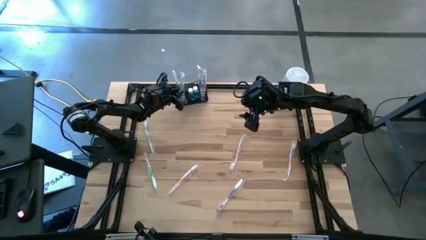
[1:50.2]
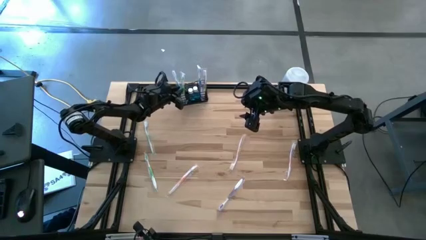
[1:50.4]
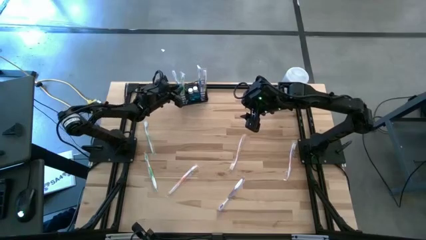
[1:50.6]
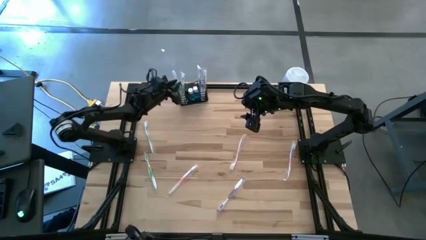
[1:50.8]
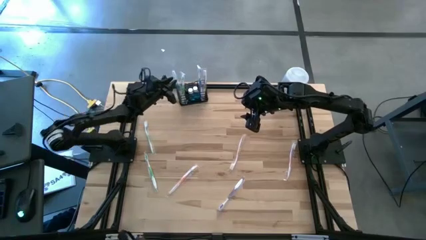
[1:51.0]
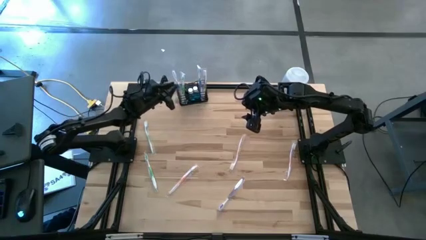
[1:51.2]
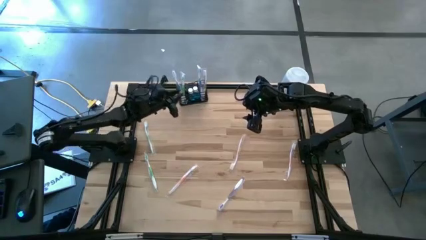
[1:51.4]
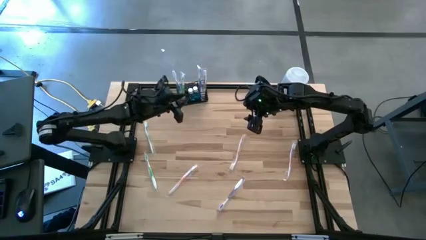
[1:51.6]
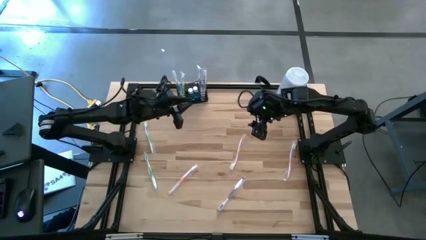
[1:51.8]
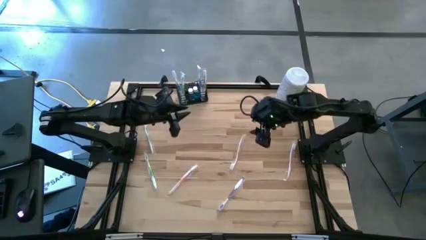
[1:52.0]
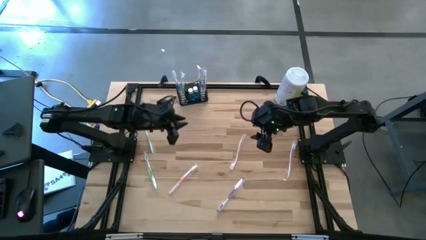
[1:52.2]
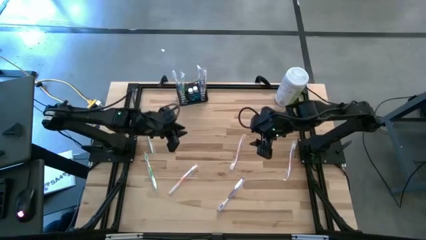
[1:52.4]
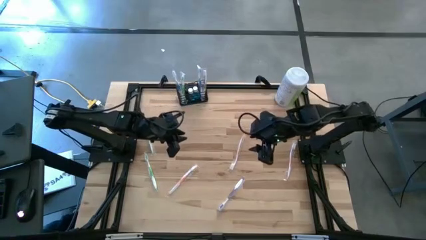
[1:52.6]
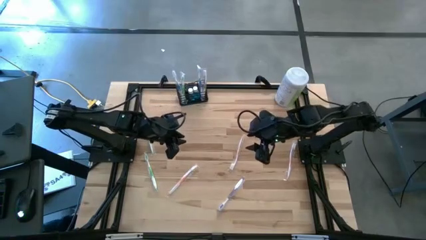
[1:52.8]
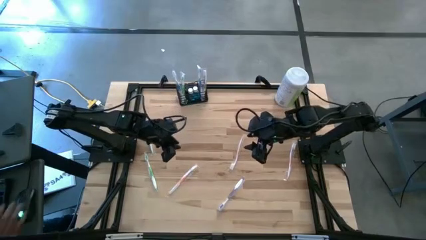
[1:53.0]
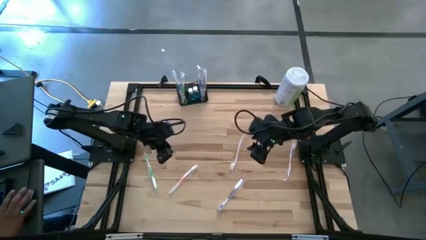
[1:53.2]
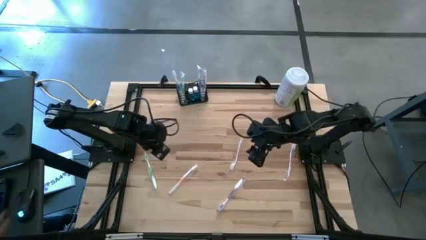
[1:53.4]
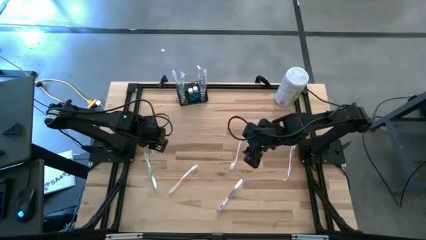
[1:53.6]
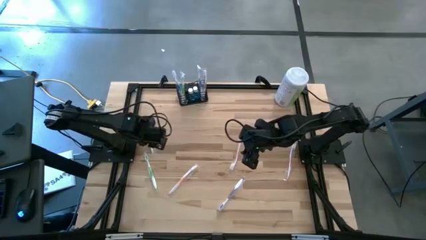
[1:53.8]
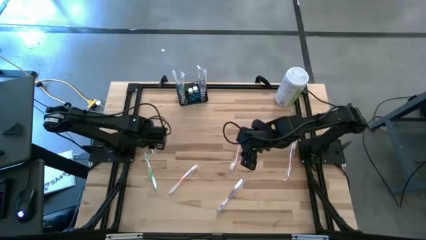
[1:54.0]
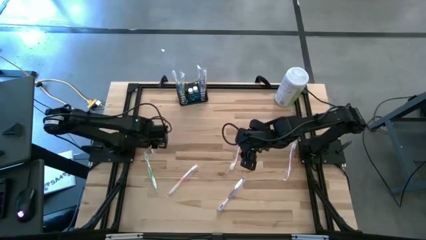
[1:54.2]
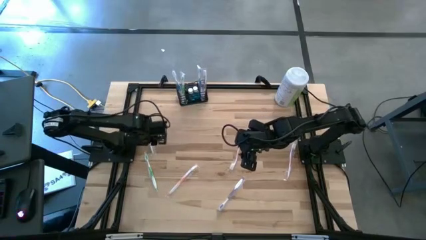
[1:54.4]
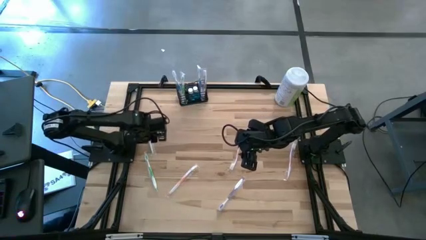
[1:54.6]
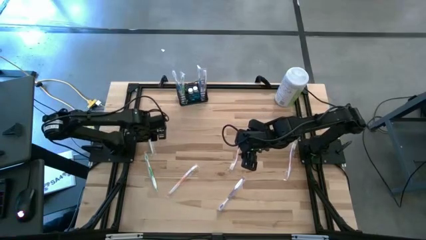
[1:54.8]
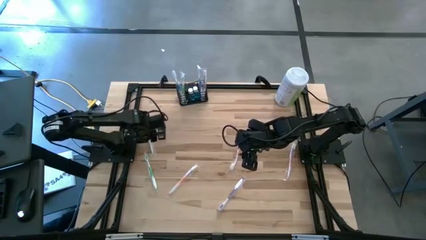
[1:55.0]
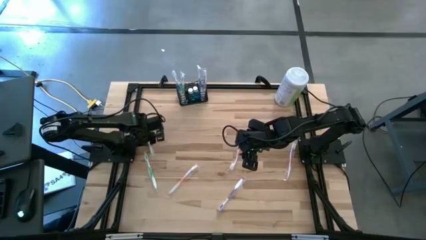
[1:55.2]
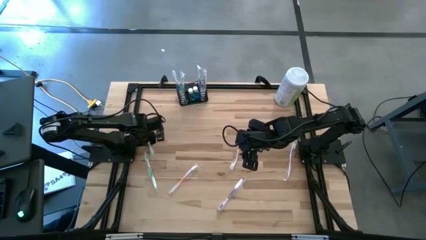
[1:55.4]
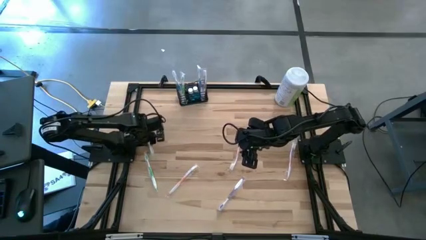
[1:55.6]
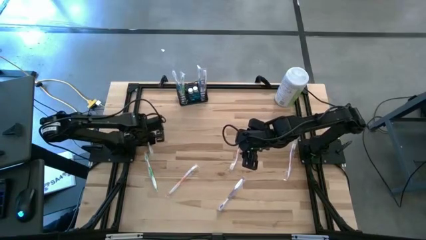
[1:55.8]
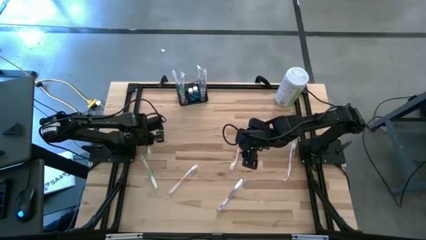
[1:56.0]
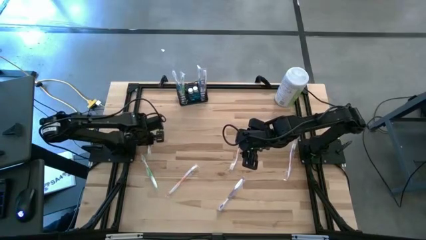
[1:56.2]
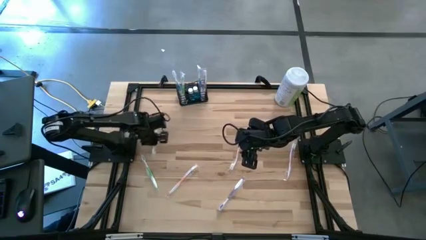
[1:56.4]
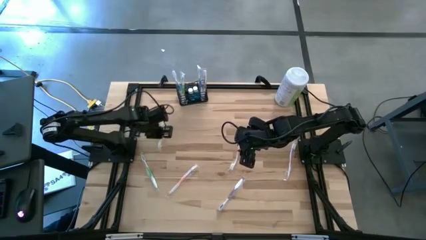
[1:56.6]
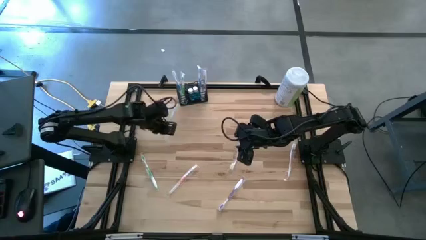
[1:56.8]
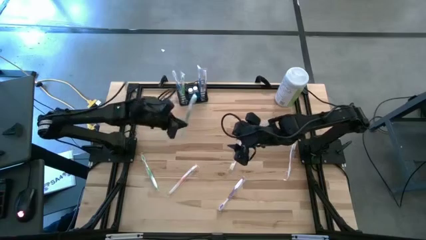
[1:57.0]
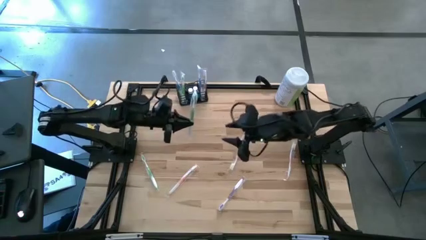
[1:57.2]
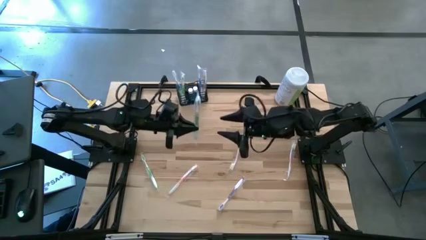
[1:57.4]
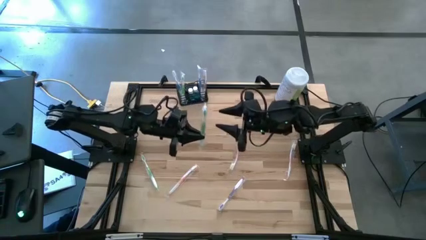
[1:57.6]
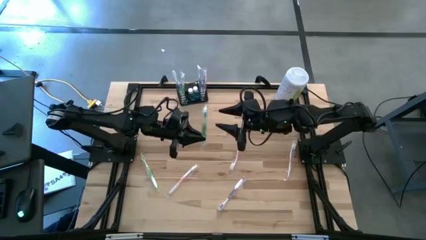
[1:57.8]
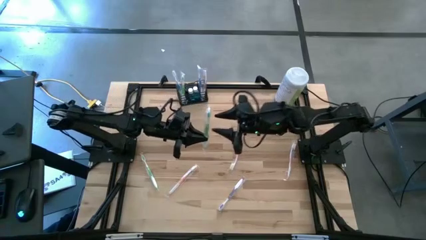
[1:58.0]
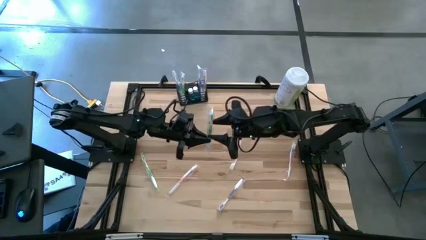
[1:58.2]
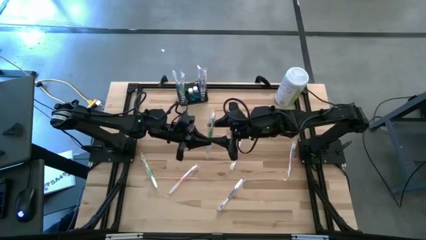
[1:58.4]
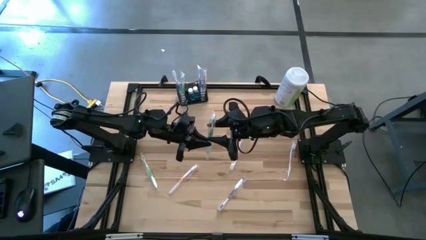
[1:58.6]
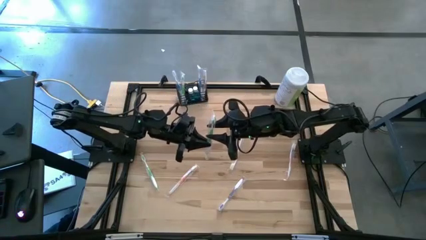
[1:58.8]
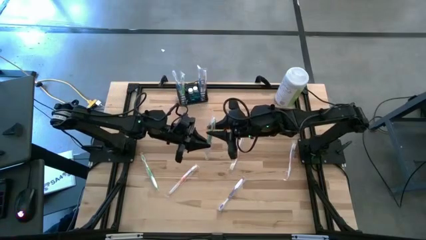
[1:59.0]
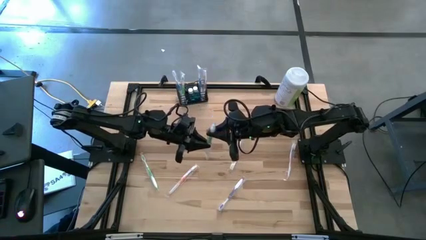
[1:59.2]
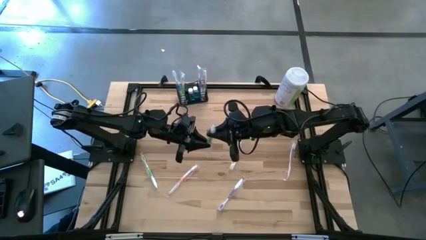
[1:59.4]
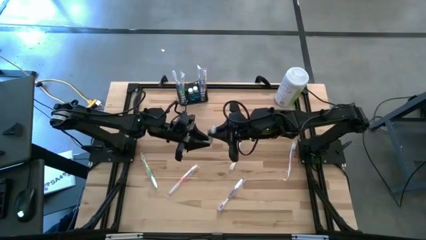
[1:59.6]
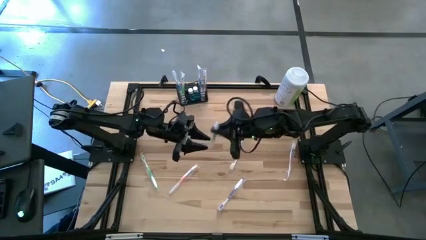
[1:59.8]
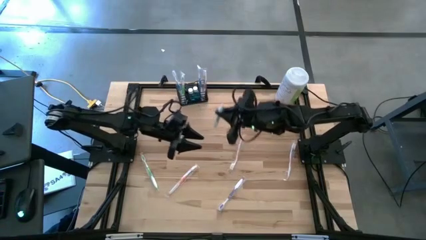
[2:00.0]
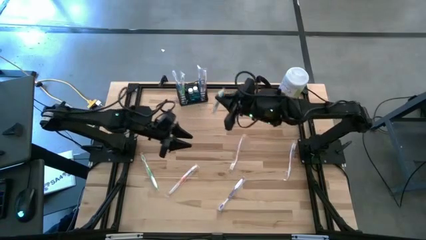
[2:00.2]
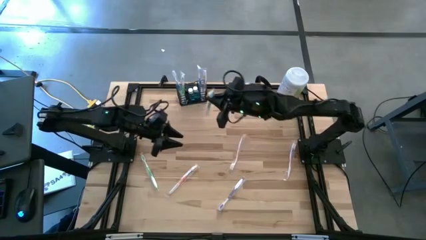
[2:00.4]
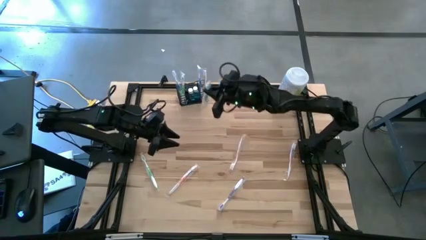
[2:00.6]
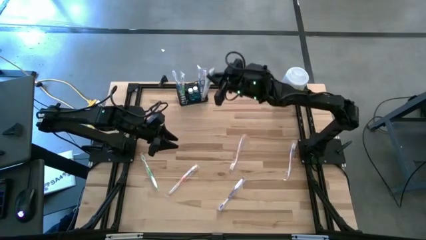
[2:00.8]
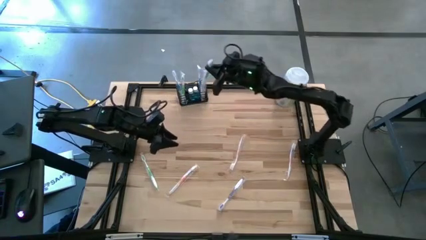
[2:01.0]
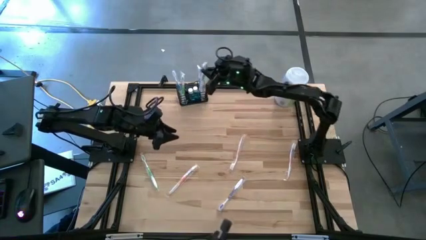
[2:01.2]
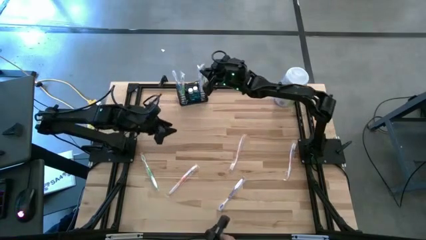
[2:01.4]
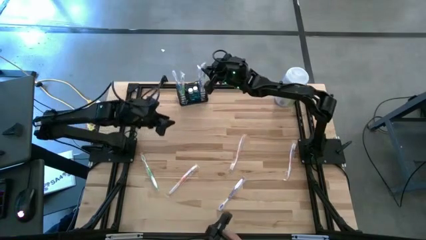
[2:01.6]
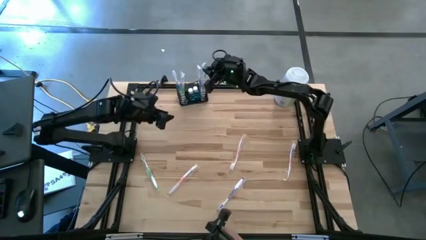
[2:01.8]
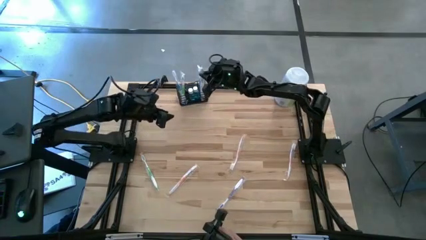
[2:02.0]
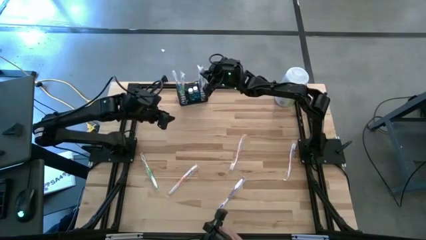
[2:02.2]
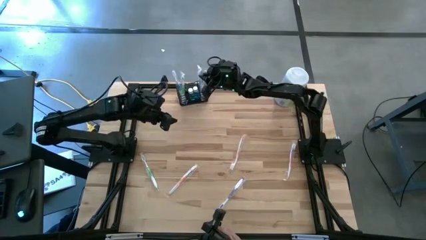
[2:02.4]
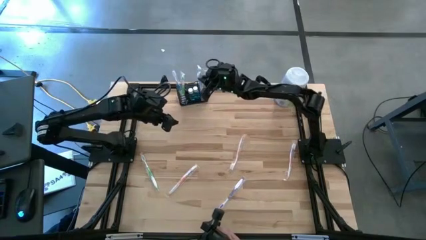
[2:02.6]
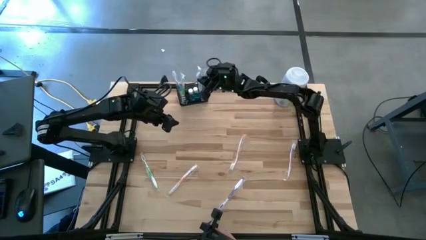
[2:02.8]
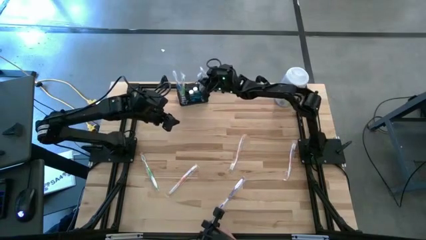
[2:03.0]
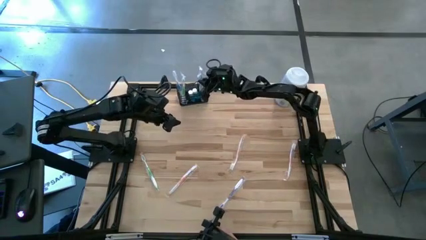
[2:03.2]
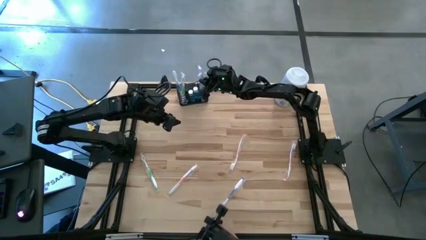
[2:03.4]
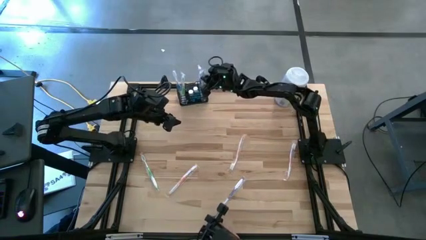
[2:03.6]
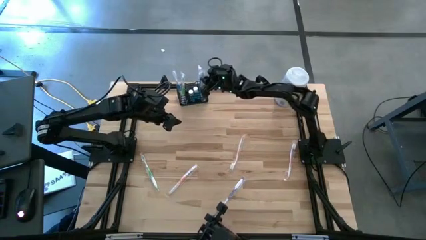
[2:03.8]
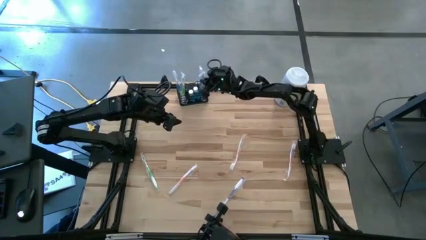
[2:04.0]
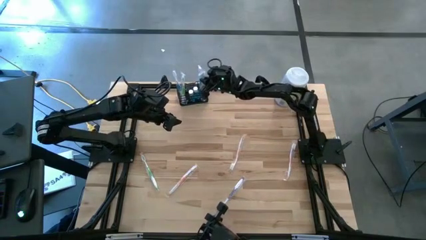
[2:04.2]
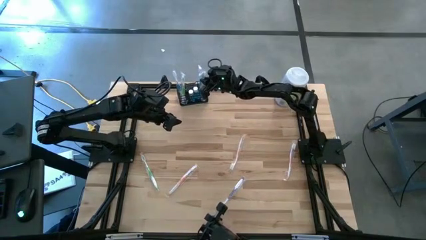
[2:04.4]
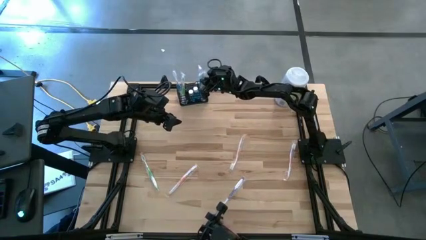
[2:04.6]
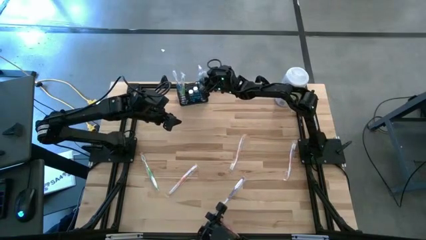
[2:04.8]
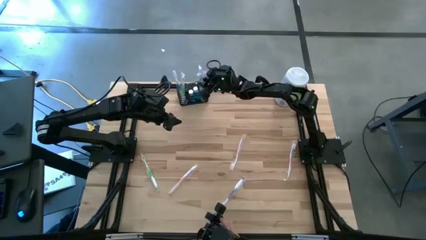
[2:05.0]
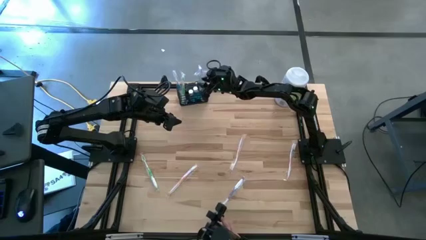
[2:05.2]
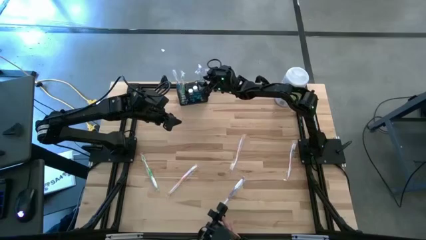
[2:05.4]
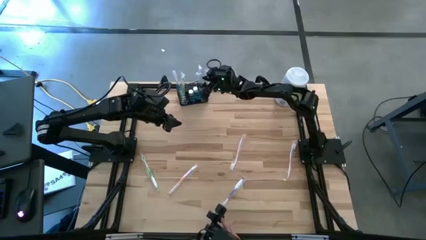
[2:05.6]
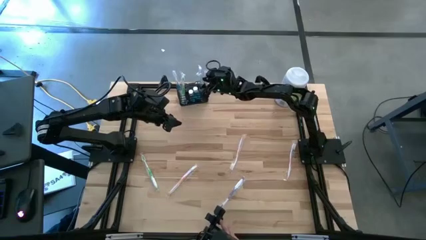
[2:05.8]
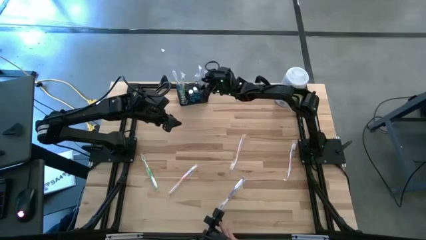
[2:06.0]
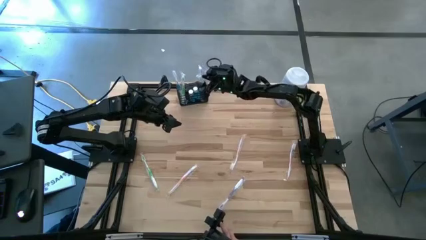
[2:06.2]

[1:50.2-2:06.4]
Task: Pick & Place toothbrushing station
Put the top green toothbrush into the black wire organizer
